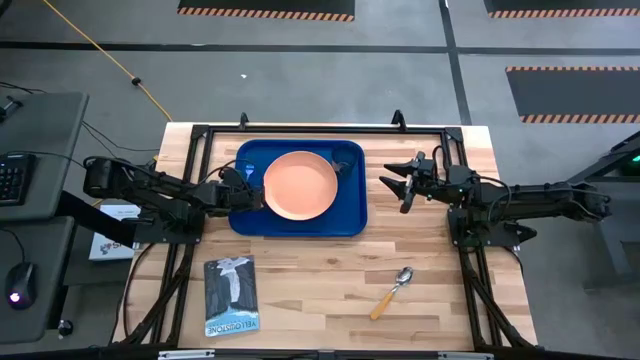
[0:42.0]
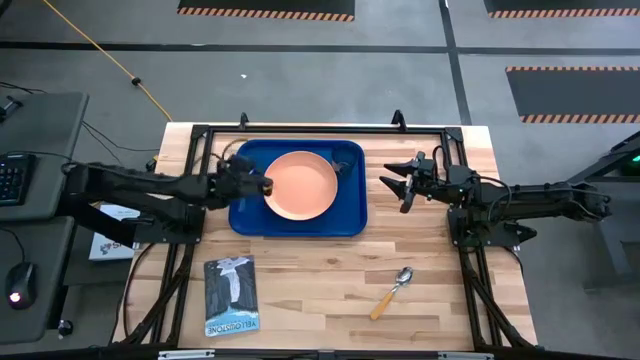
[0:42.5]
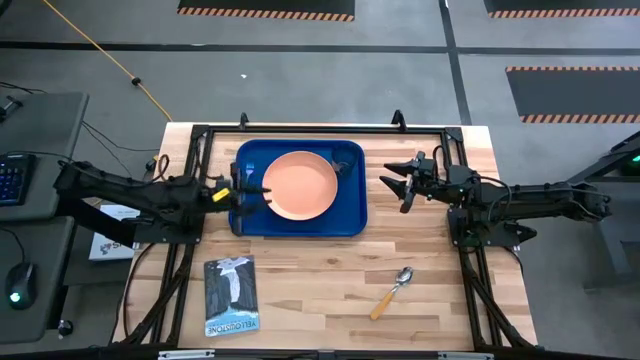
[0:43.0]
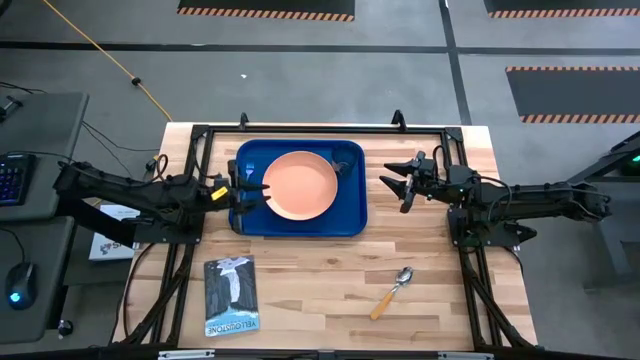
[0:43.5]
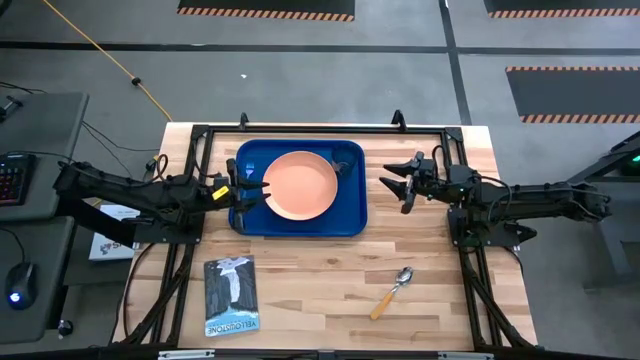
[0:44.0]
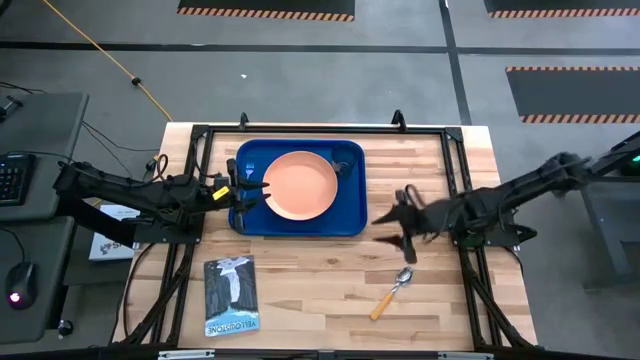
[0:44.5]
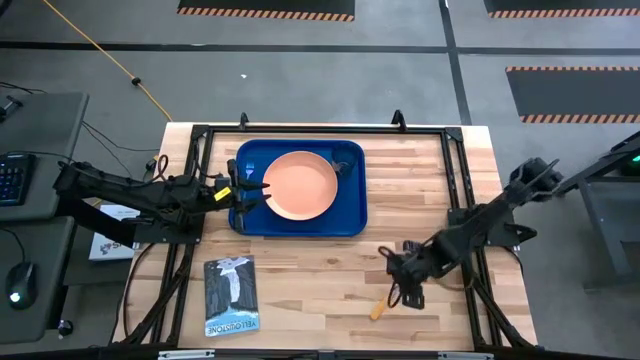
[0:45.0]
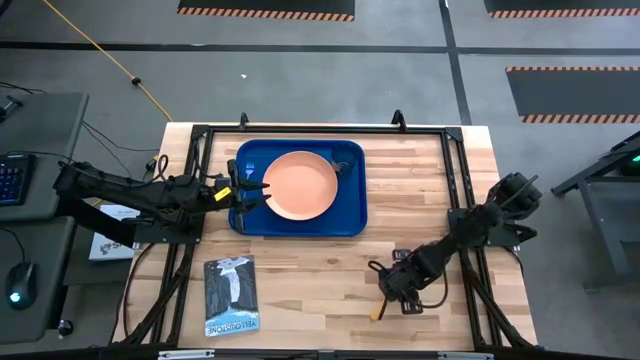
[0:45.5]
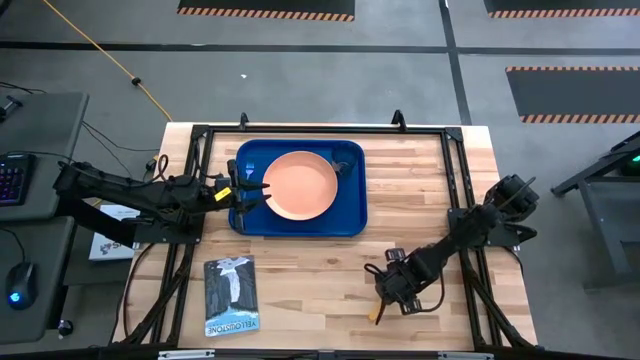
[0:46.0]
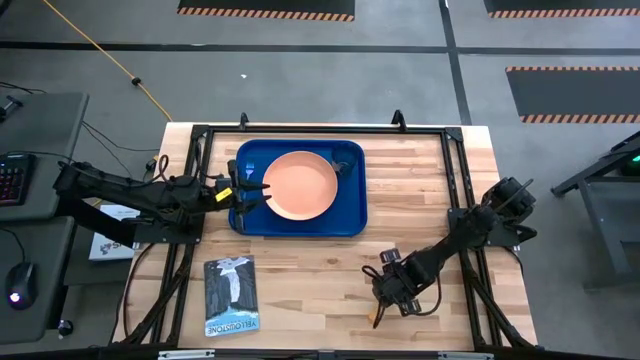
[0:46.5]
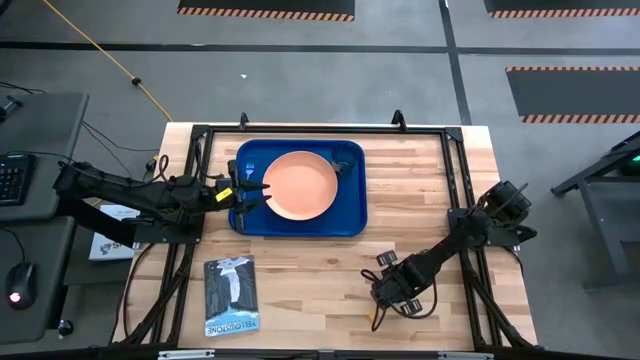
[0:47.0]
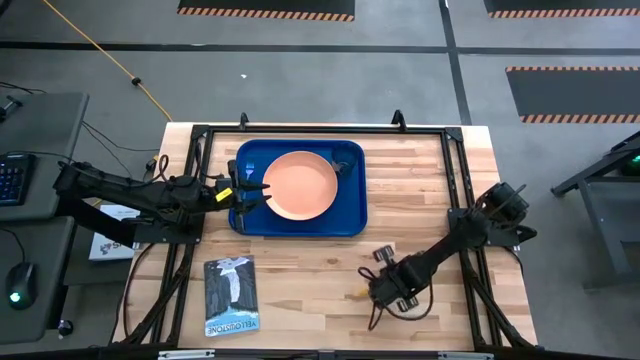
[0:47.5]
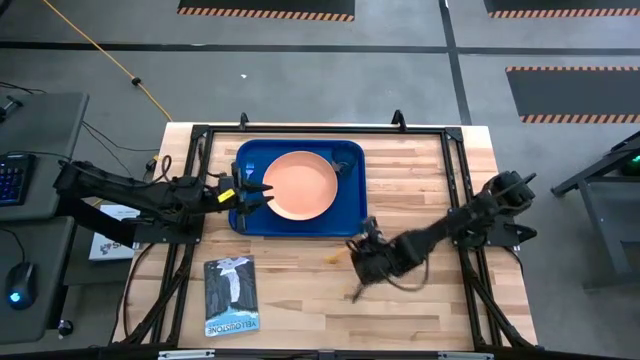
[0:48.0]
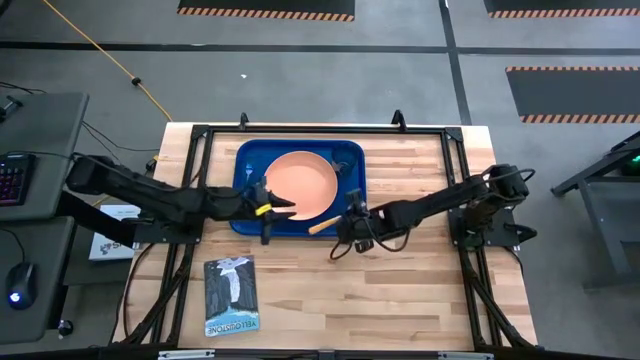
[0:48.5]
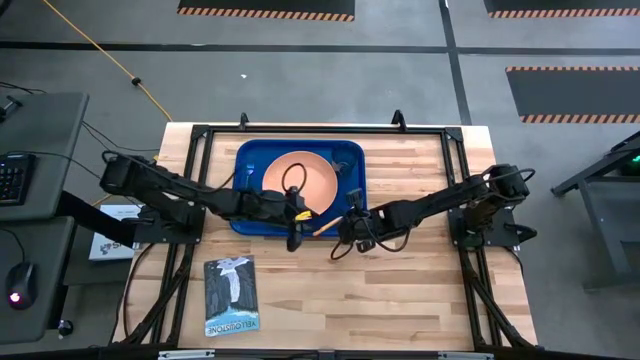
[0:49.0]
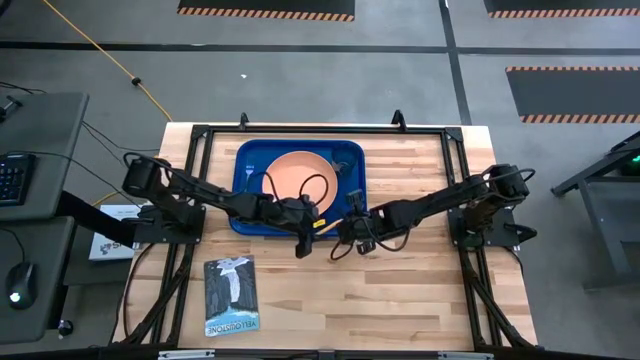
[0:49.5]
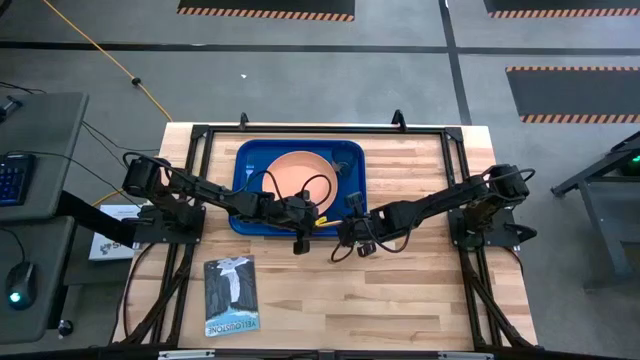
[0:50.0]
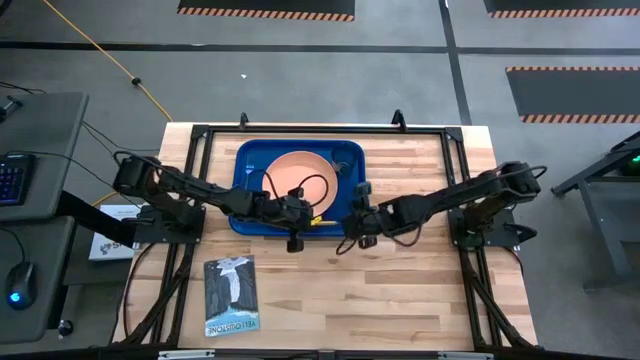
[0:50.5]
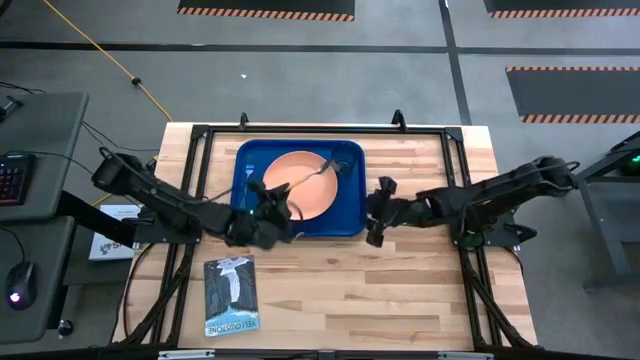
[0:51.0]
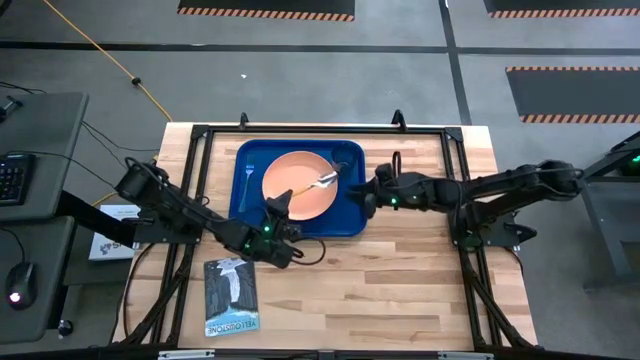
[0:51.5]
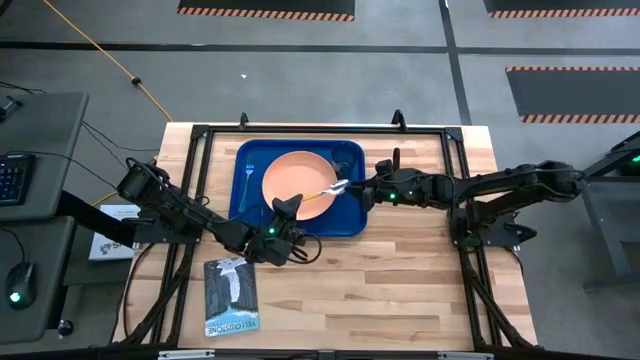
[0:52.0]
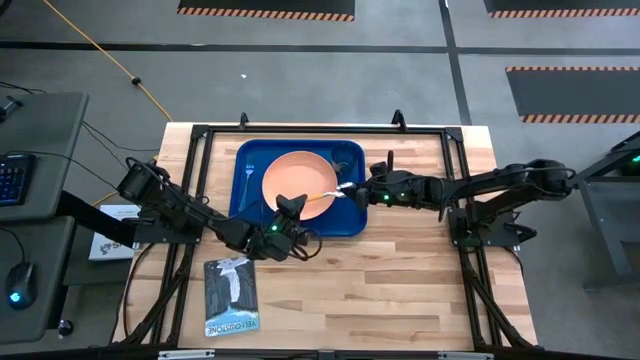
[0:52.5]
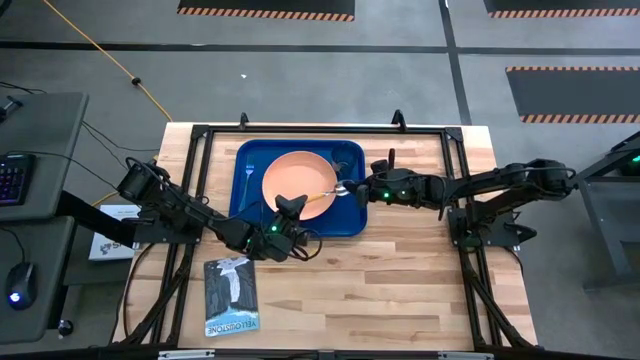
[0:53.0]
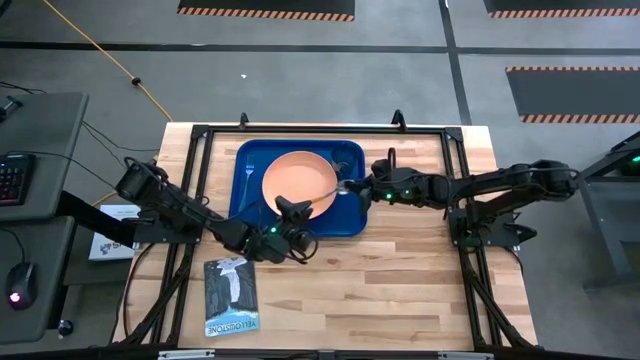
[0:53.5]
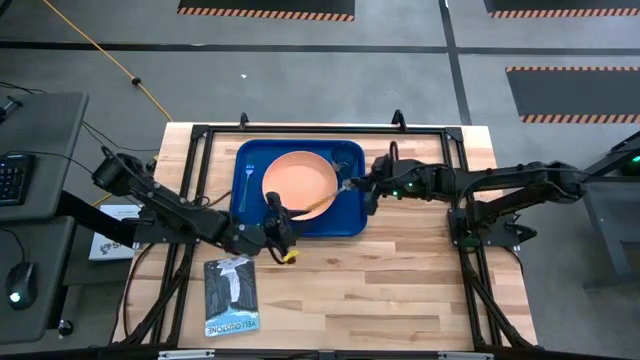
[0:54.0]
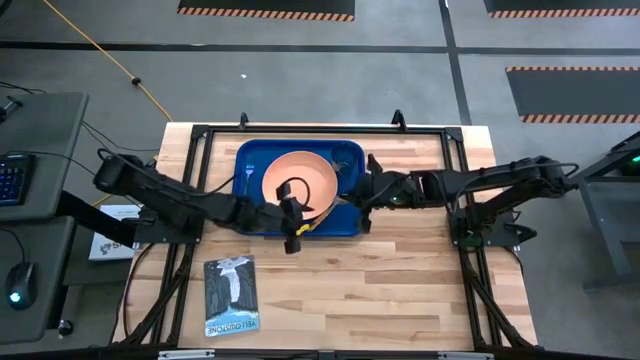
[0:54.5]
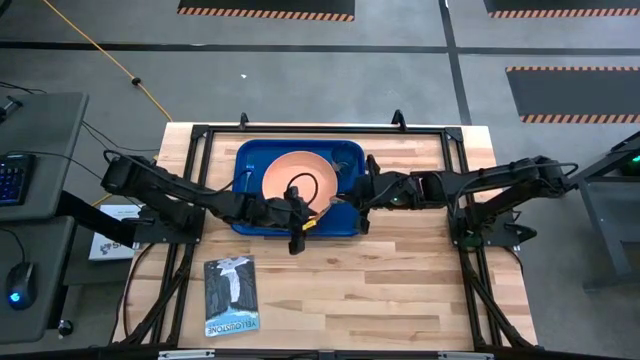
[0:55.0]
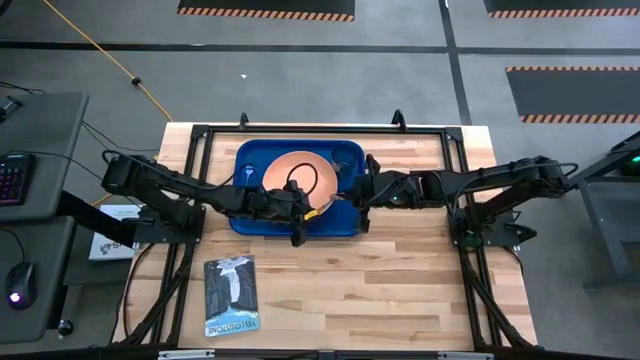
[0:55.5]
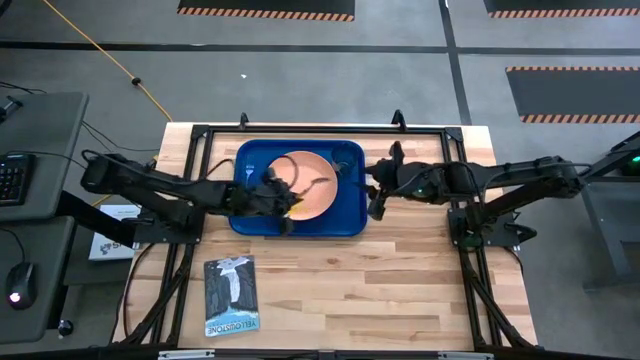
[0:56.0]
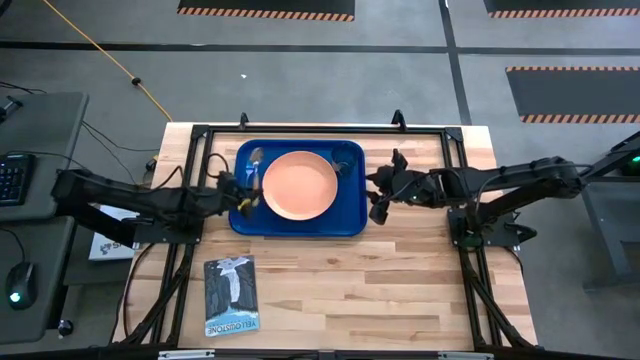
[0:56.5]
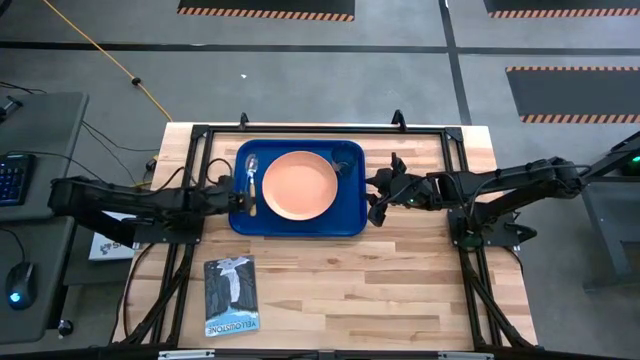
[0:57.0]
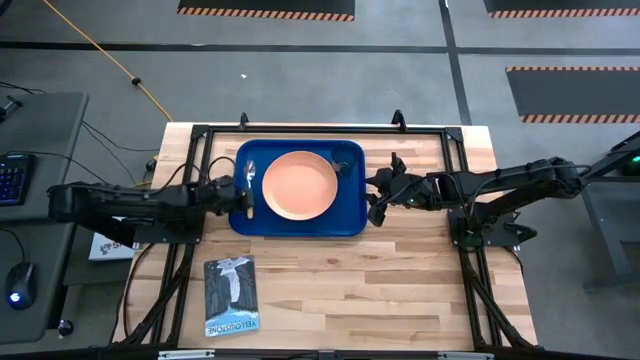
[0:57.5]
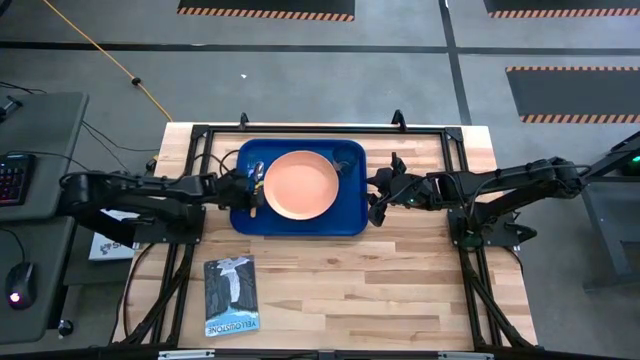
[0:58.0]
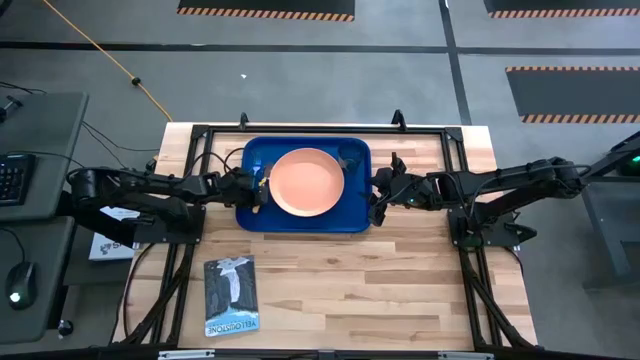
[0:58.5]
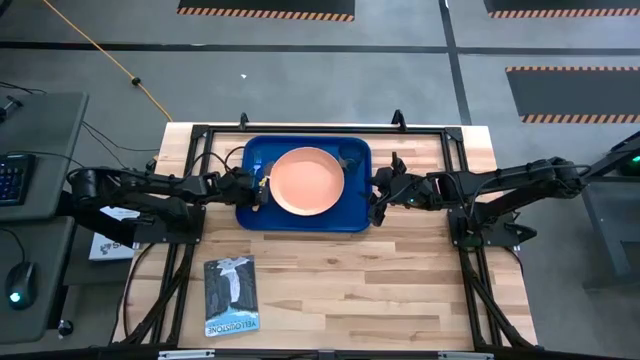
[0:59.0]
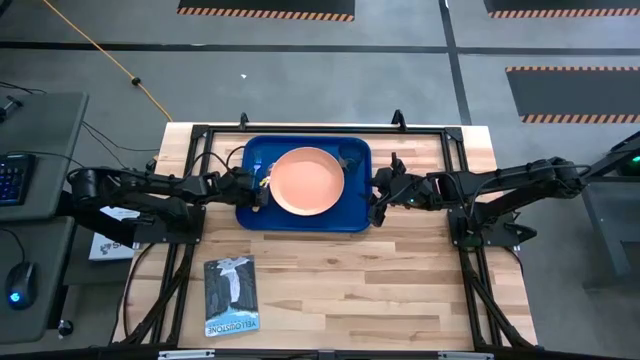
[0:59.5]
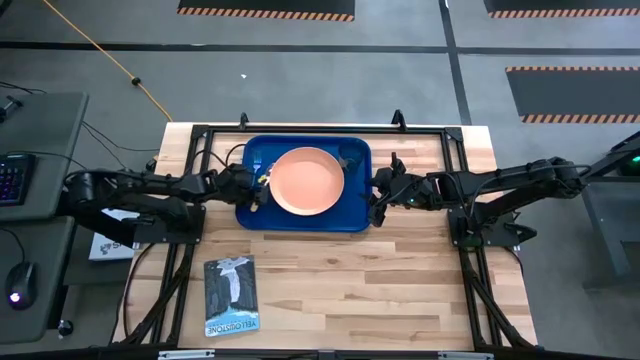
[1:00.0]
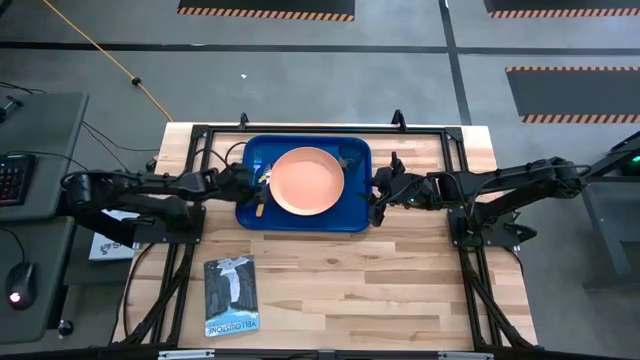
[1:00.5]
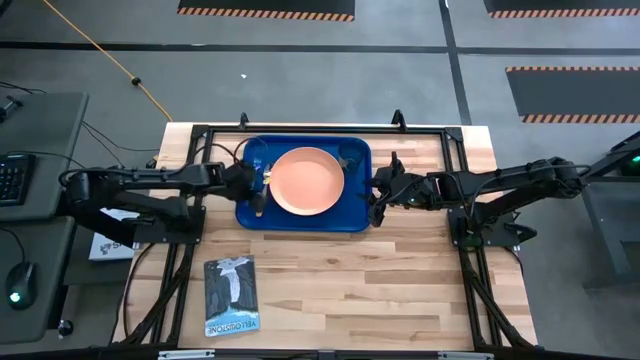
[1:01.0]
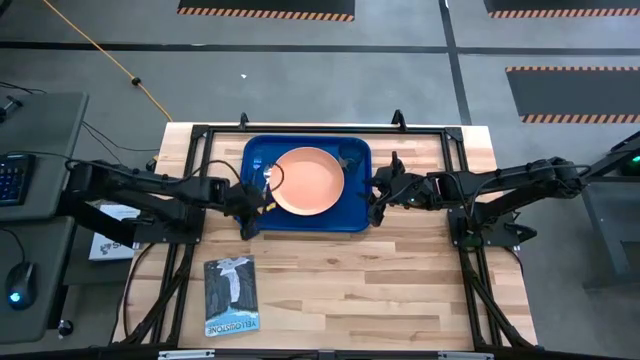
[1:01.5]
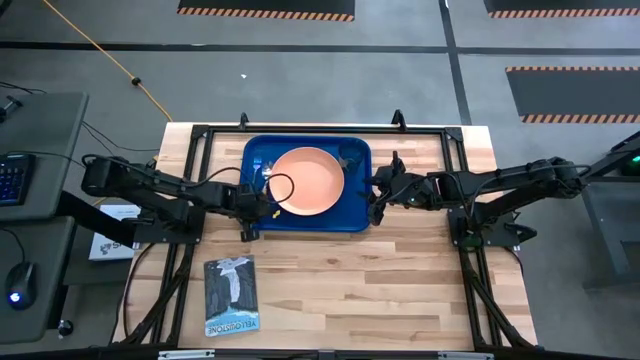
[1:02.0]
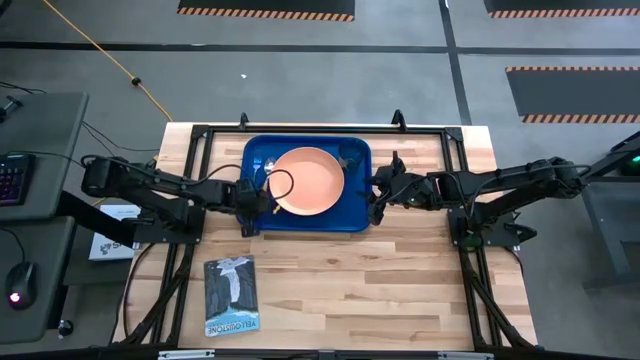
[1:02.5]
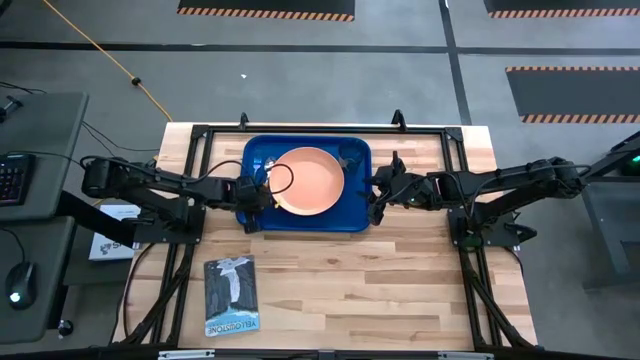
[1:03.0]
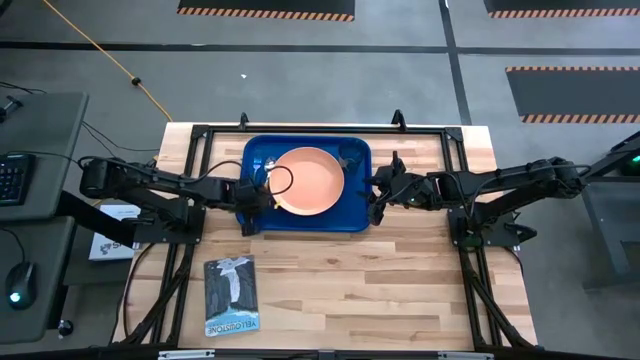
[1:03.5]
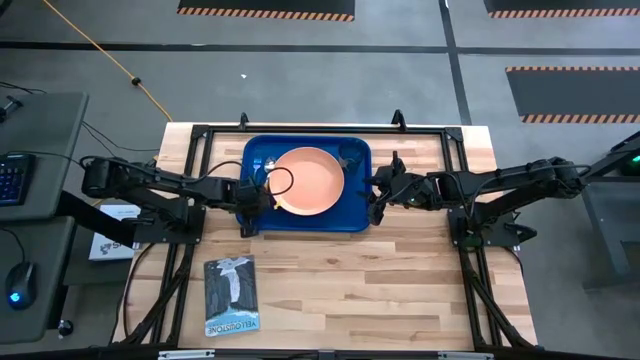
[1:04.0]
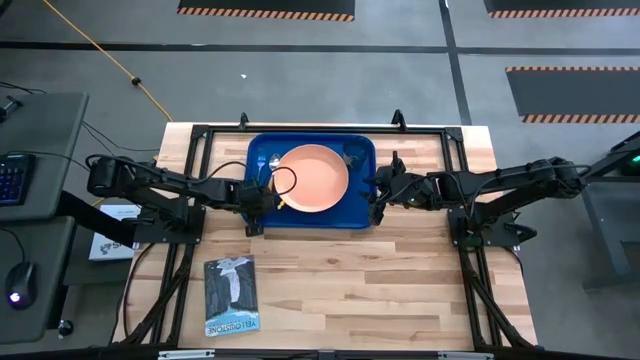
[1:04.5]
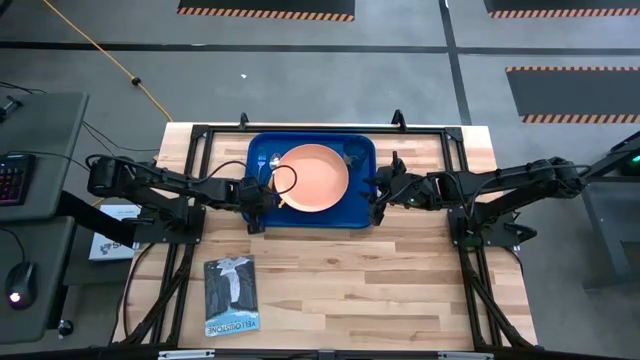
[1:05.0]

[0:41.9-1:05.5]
Task: Pick and place plate/cup/fork/spoon on tray
Put the orange spoon on the blue tray
